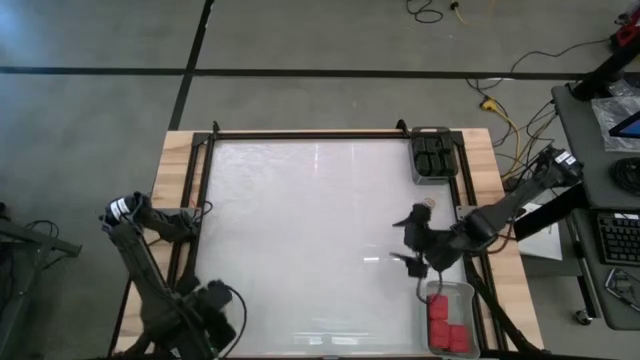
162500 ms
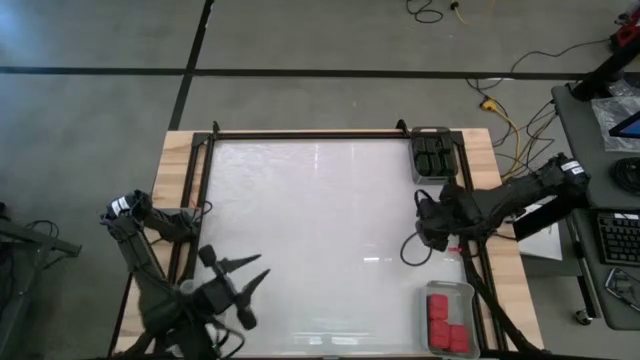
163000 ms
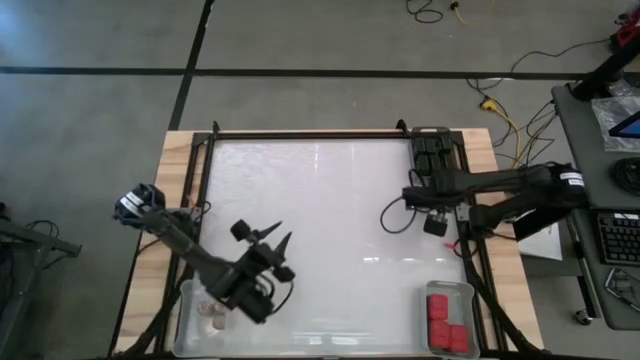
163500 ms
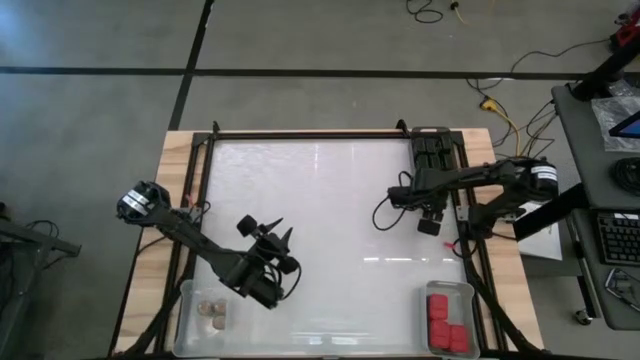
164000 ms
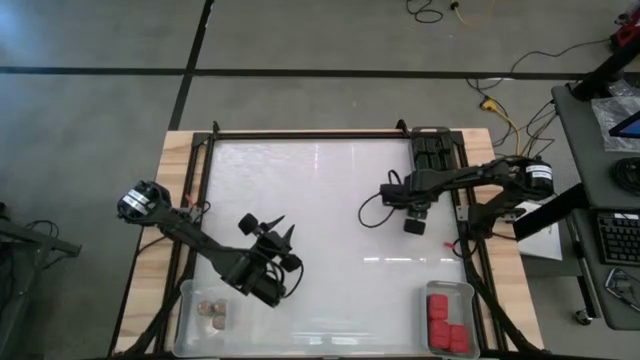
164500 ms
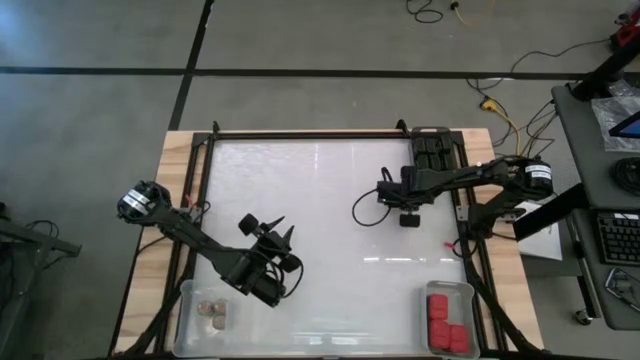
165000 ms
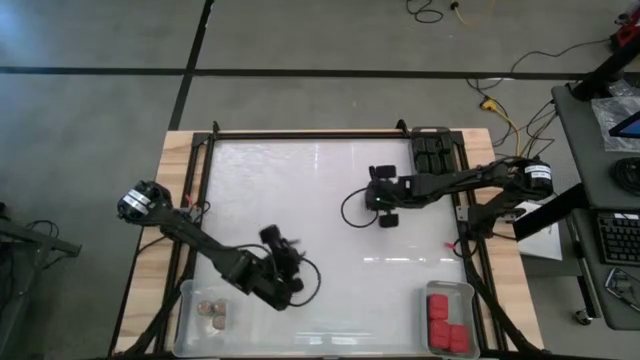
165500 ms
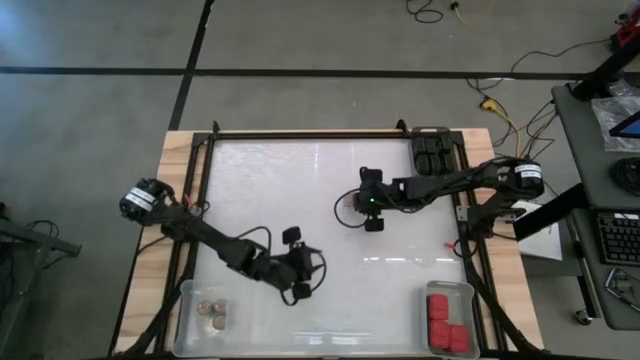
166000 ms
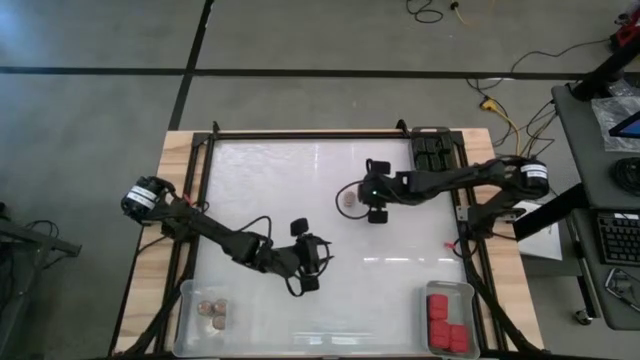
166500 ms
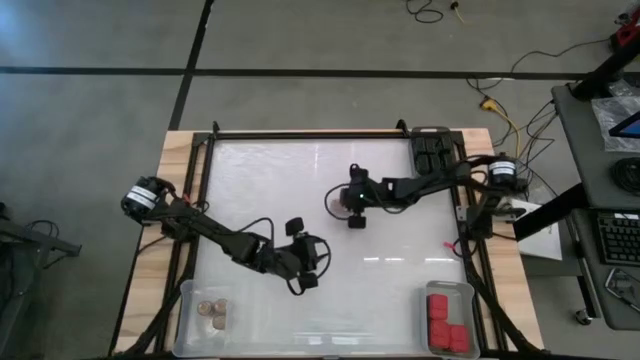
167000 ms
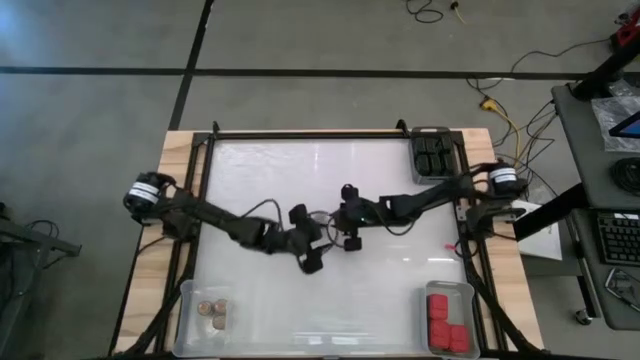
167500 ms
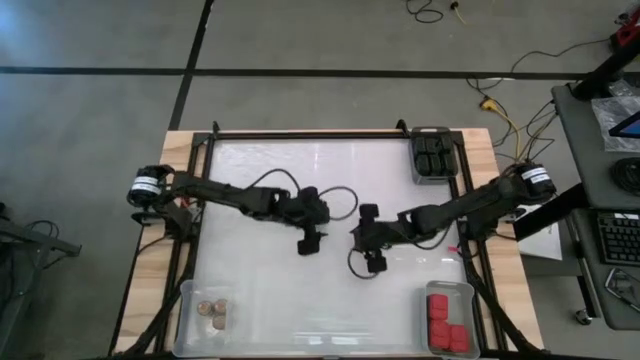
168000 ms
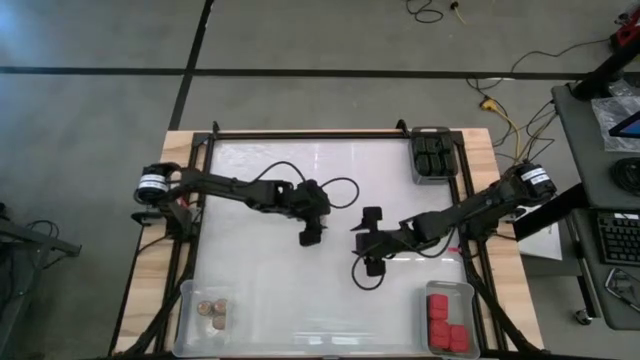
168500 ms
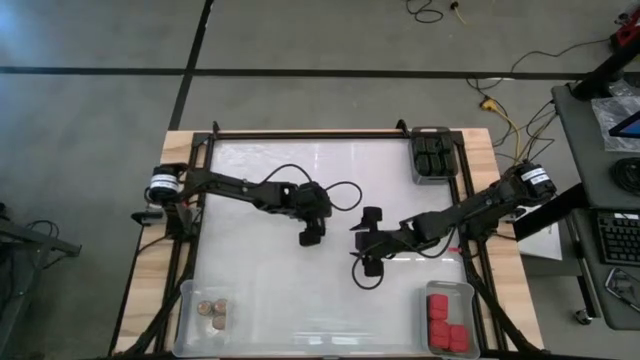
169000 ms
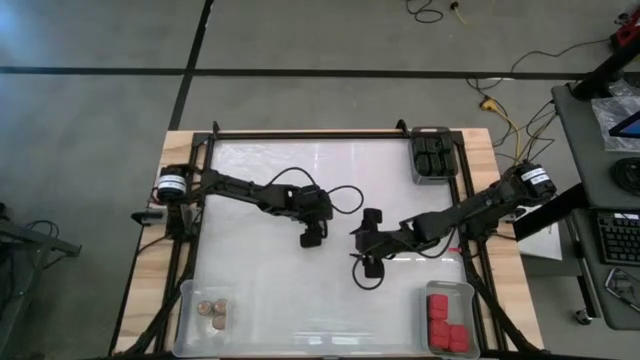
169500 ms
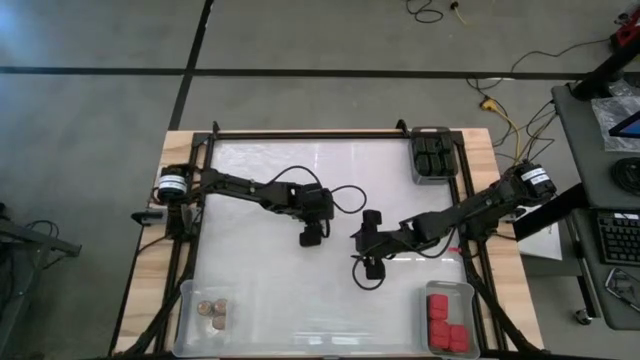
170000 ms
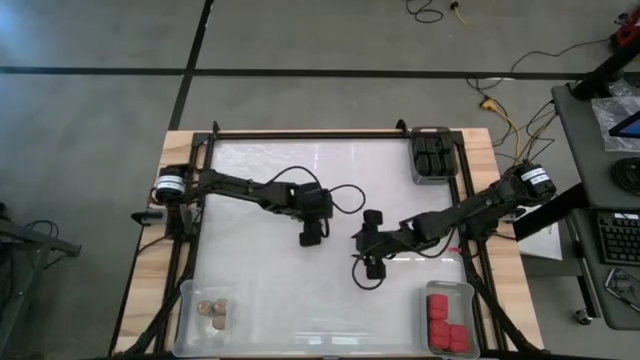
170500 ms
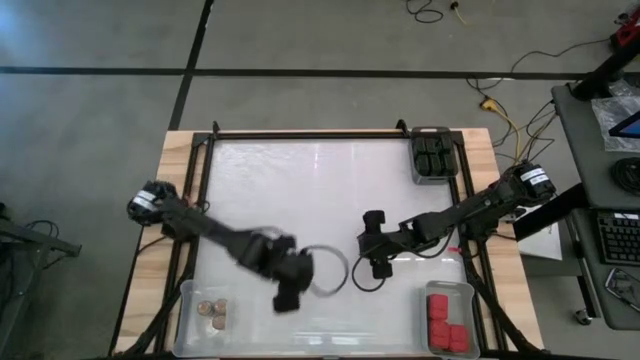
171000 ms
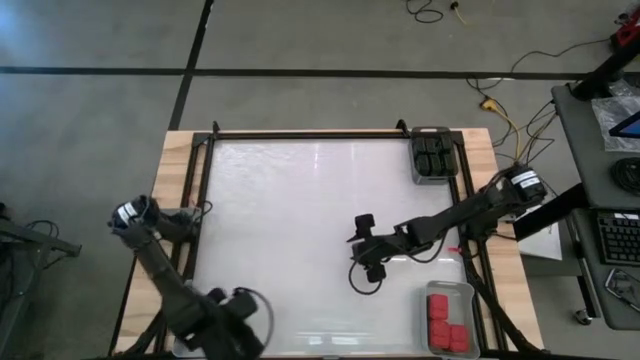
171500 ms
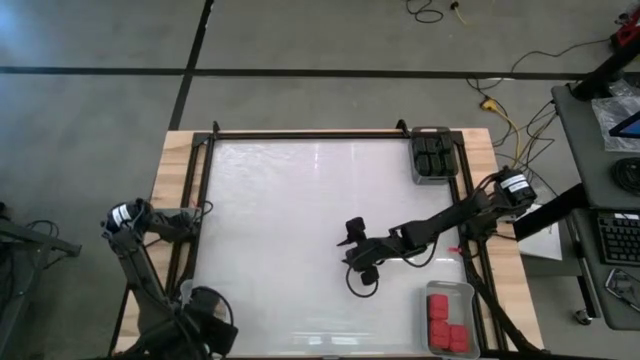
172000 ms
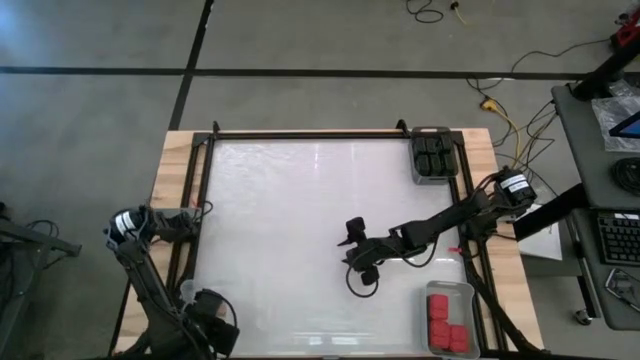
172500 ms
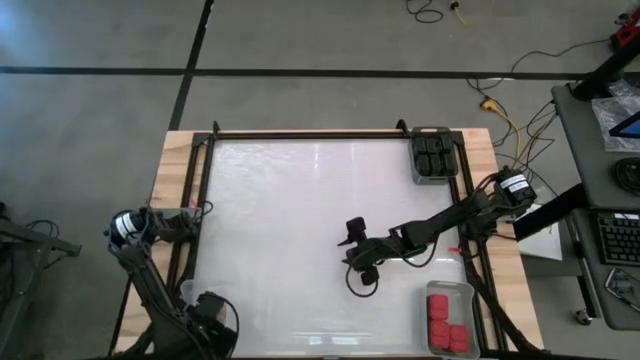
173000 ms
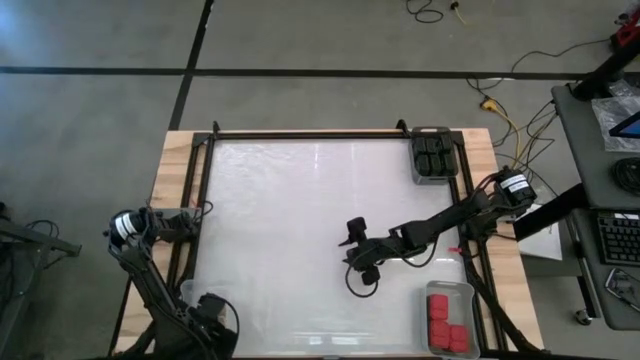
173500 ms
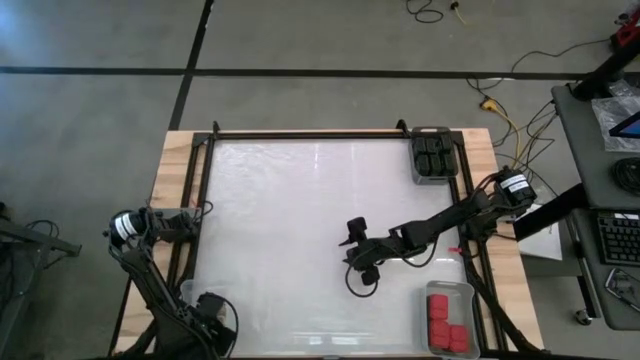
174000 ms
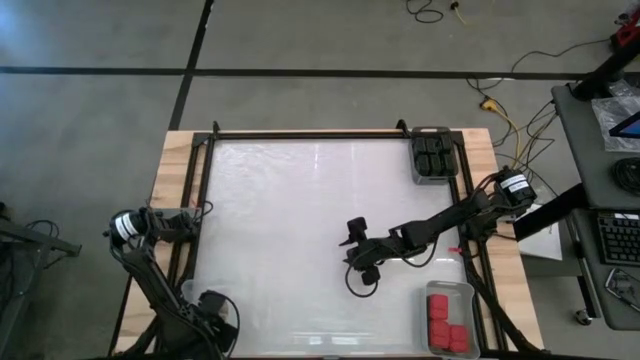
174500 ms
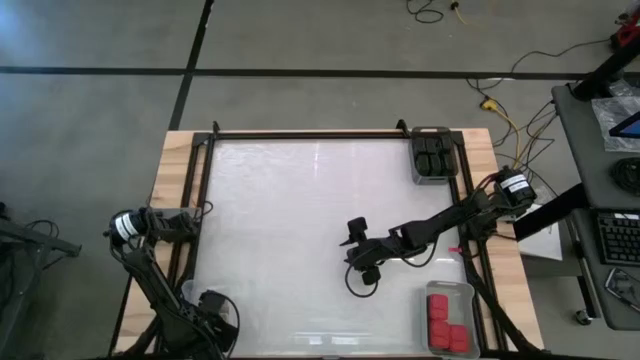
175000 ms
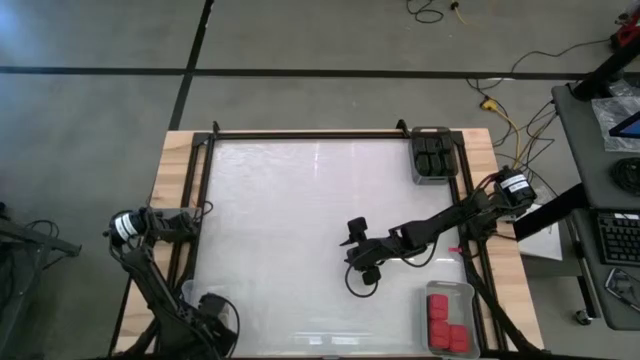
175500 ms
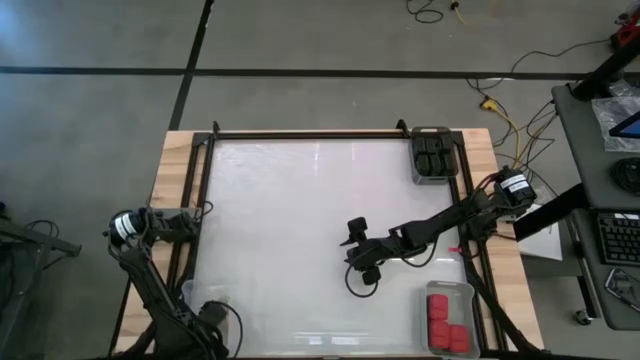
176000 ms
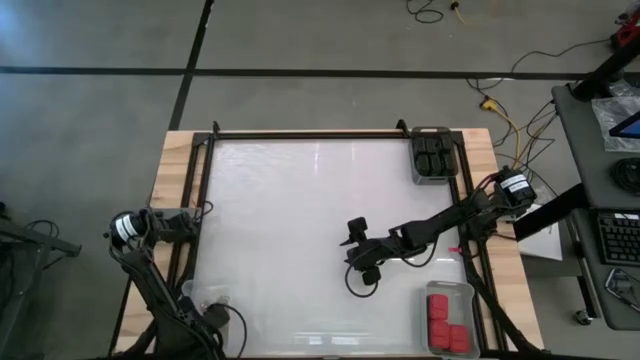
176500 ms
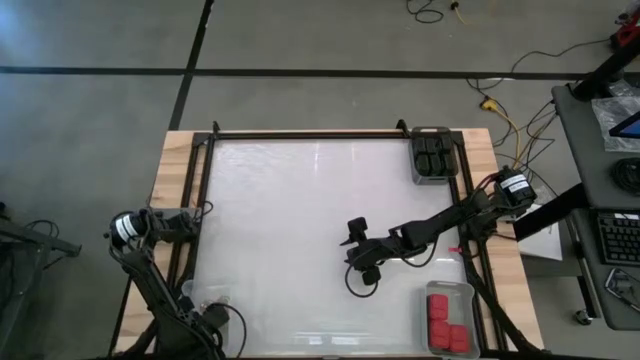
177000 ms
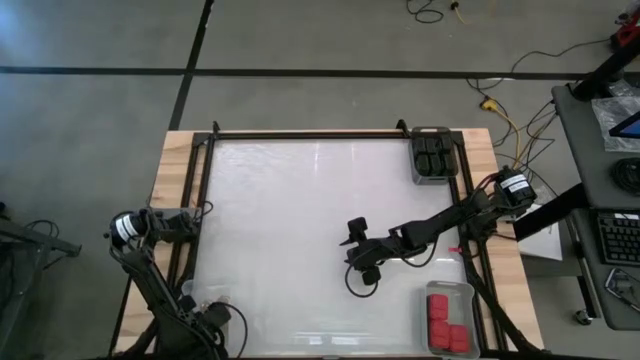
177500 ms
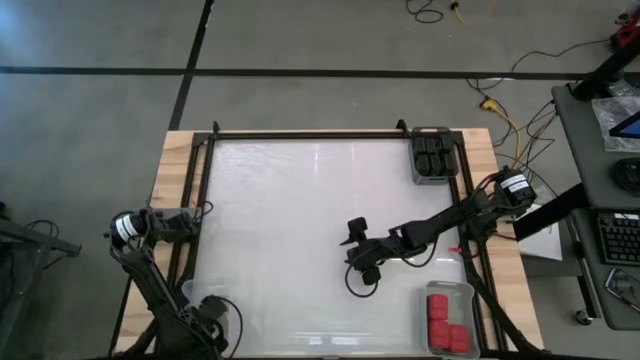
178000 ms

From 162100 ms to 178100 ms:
Task: Sort spices by type
Put the brown seasoning bottle into the transparent bin

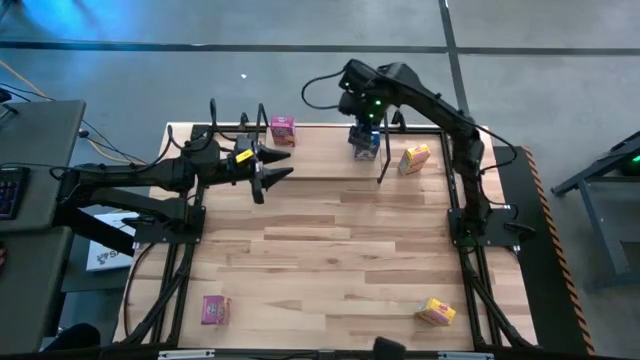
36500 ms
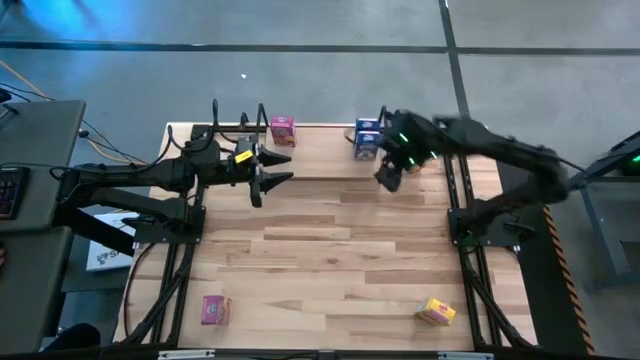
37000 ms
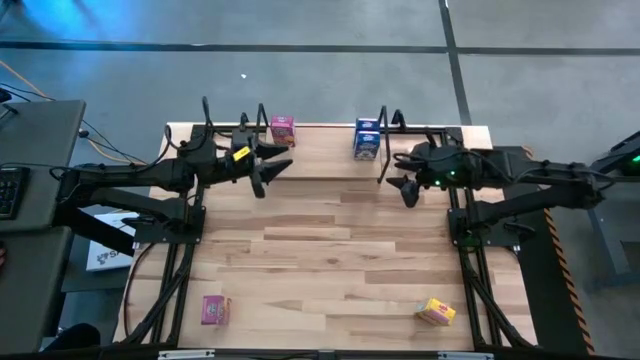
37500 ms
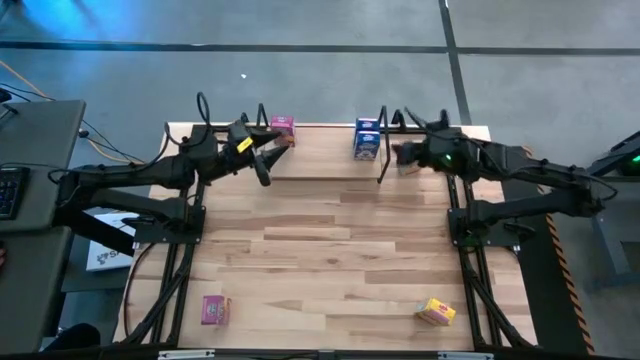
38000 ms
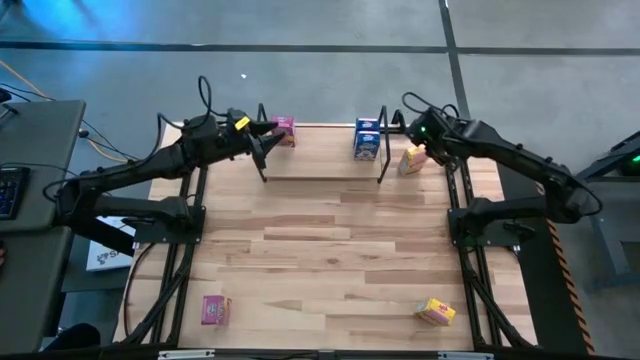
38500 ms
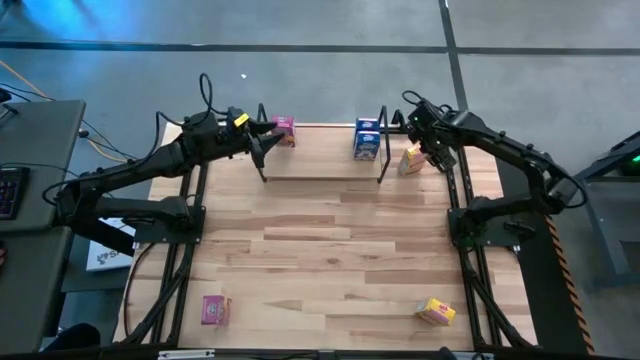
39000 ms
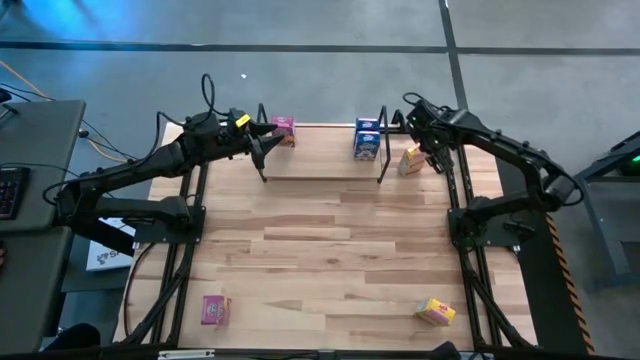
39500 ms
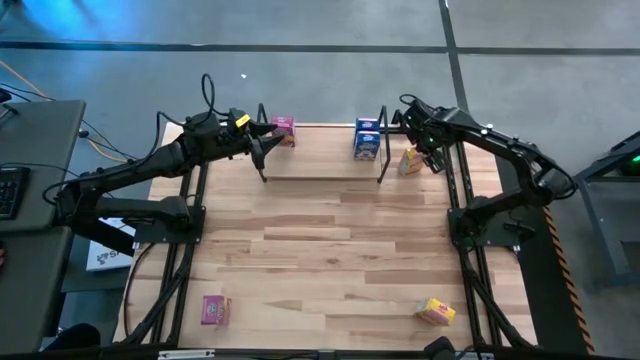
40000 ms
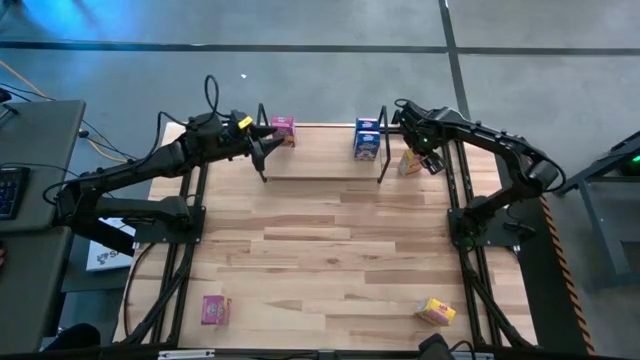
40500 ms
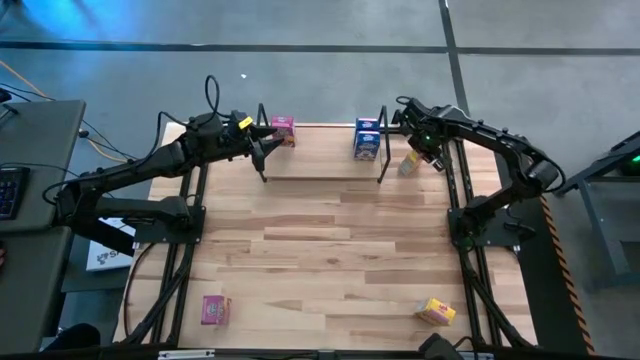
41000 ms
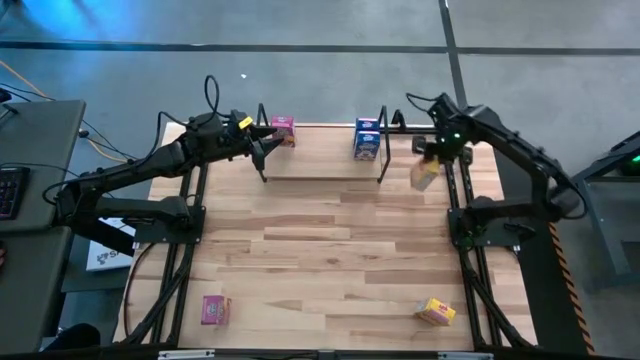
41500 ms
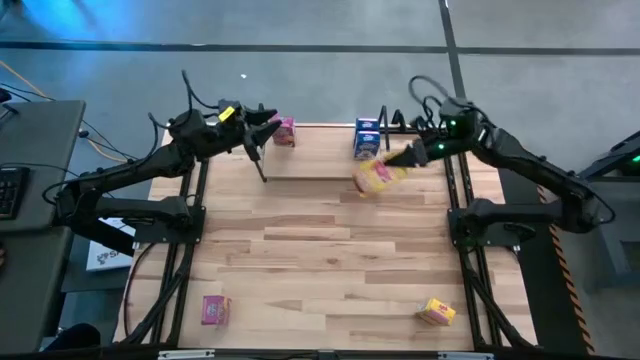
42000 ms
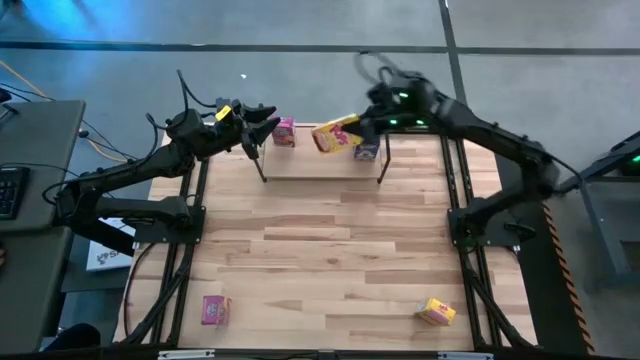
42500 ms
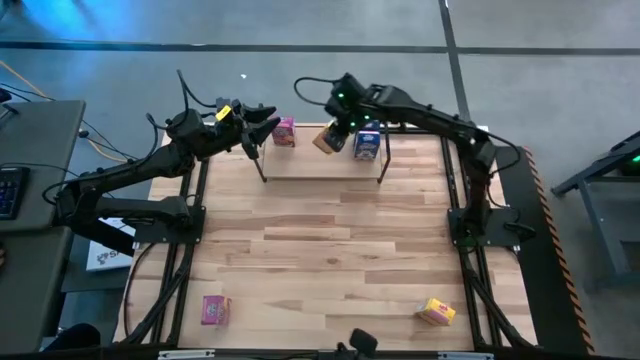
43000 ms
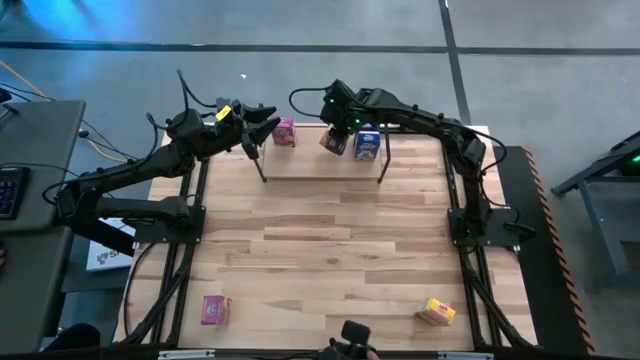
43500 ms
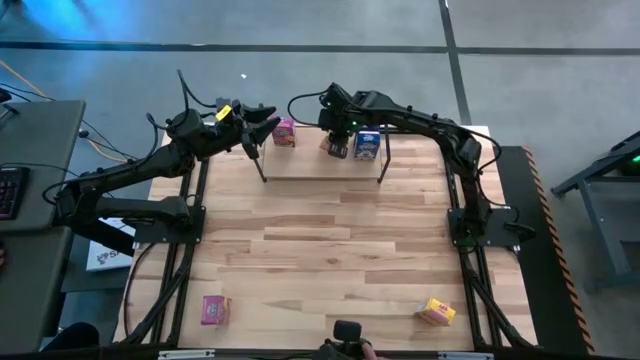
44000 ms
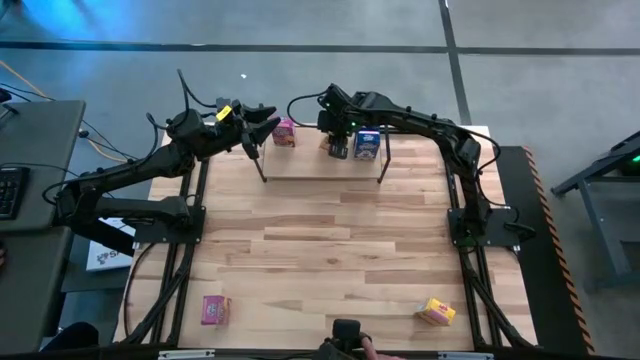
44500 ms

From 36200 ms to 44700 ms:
Task: Stack cereal on shelf
Put the top yellow cereal box on the shelf
